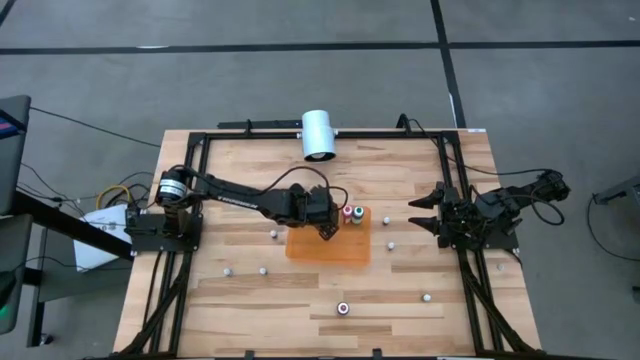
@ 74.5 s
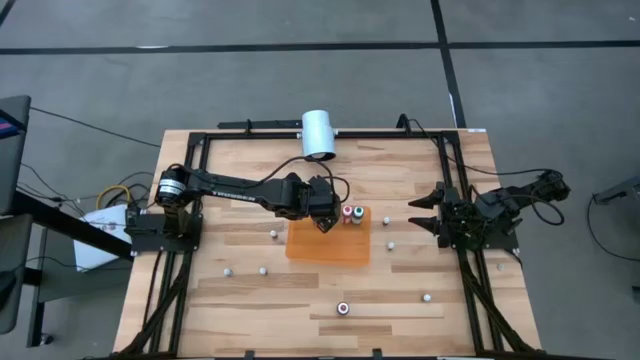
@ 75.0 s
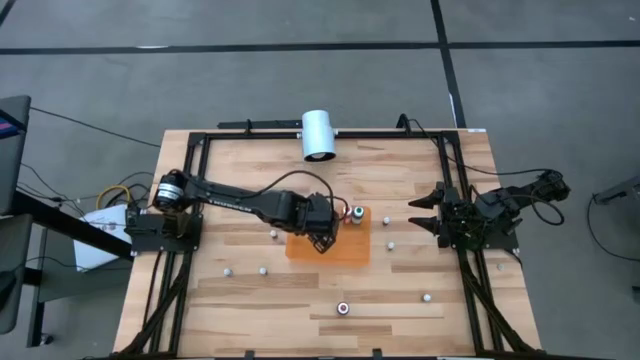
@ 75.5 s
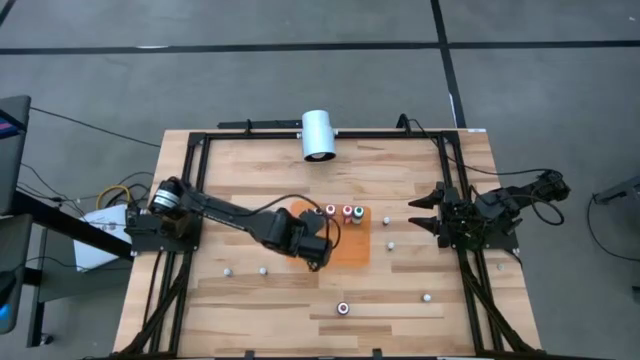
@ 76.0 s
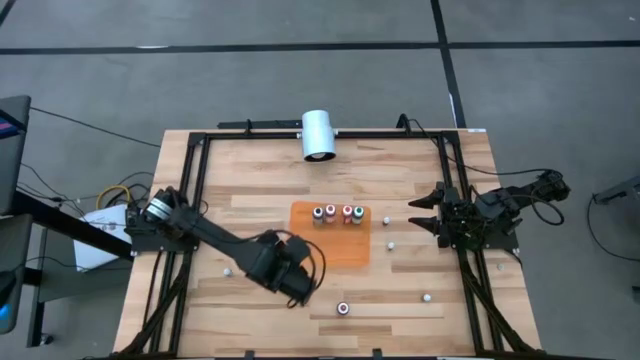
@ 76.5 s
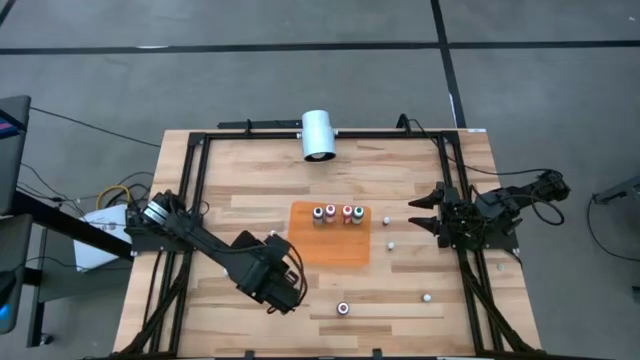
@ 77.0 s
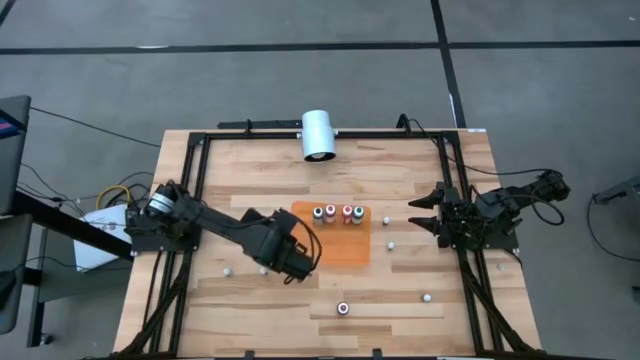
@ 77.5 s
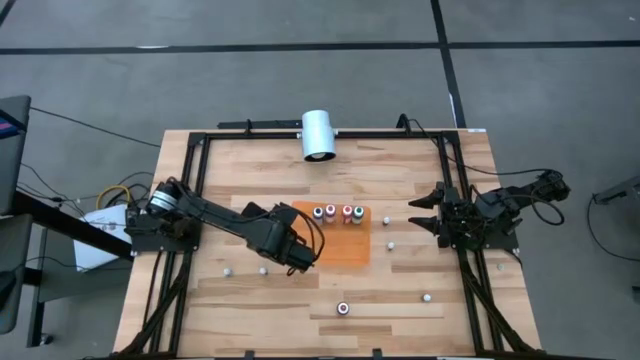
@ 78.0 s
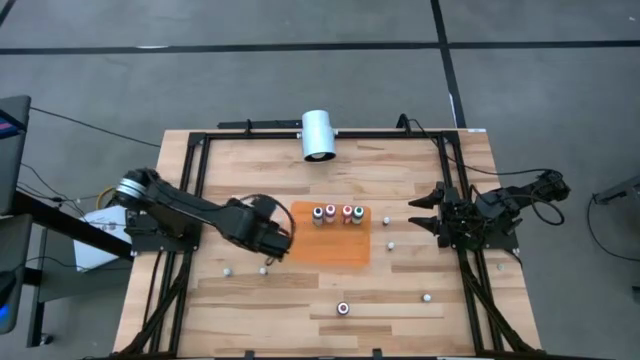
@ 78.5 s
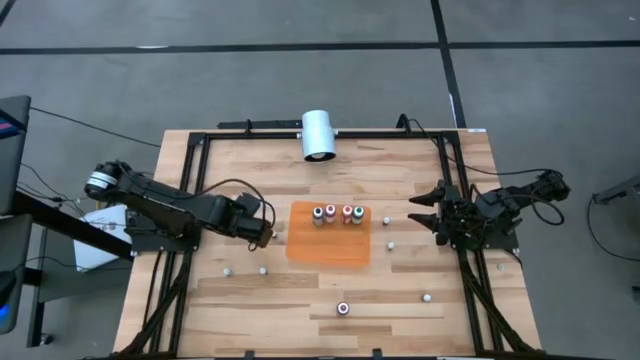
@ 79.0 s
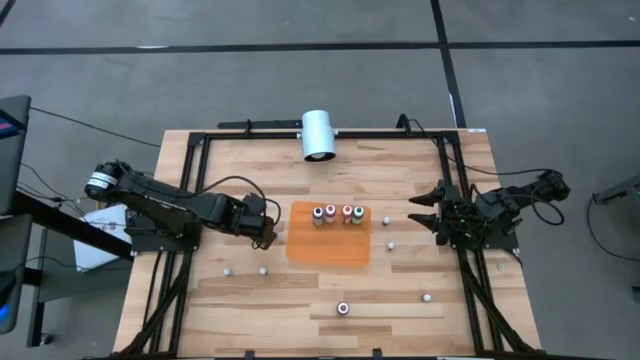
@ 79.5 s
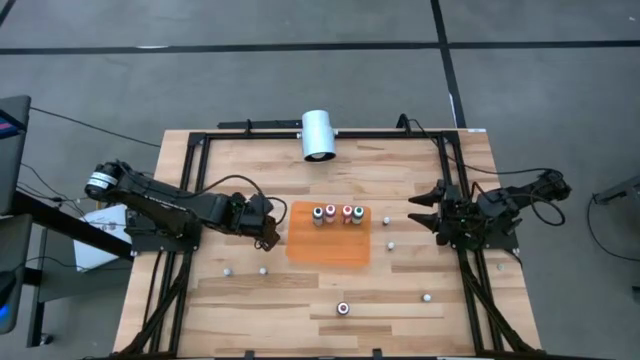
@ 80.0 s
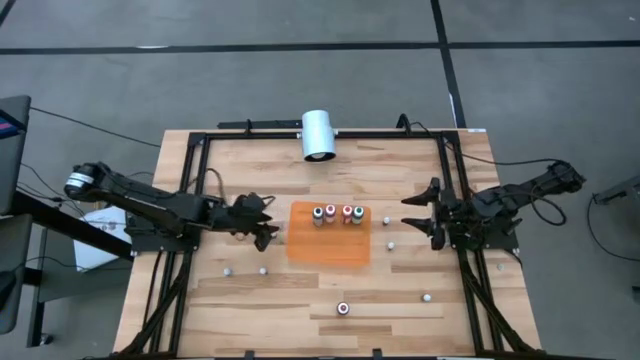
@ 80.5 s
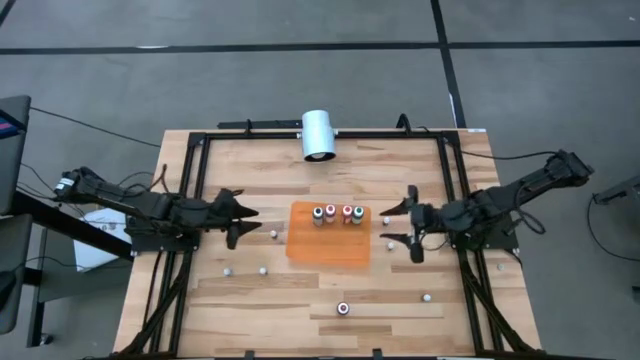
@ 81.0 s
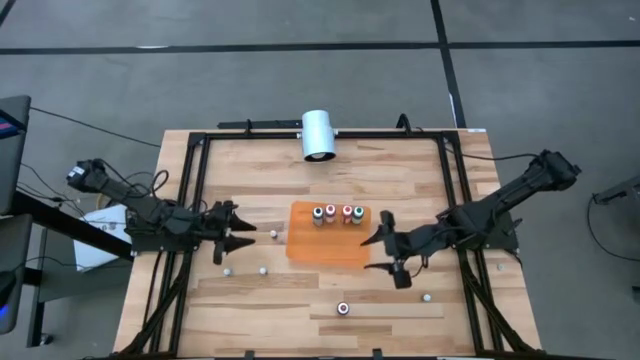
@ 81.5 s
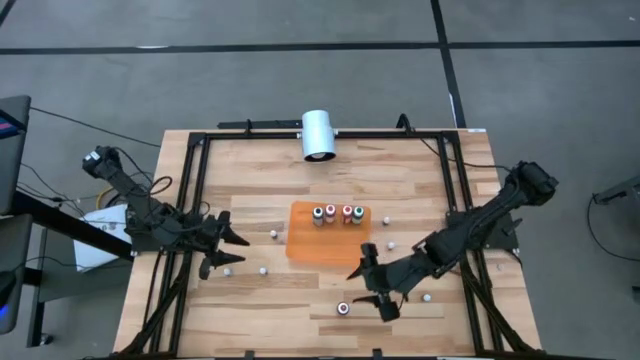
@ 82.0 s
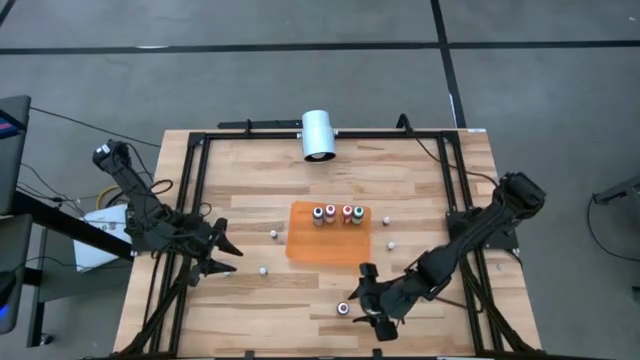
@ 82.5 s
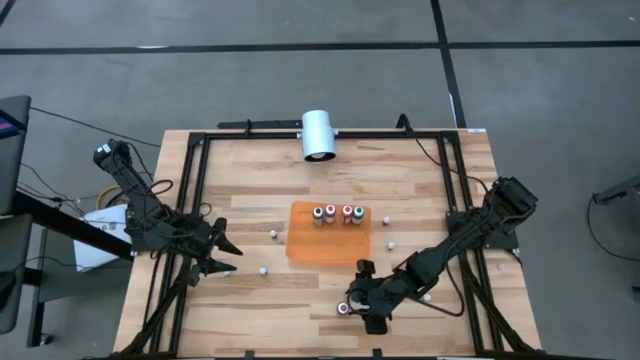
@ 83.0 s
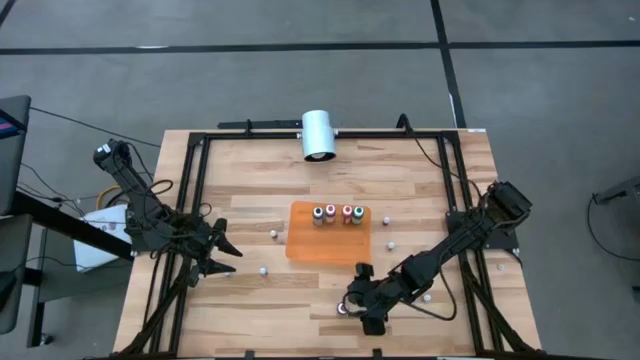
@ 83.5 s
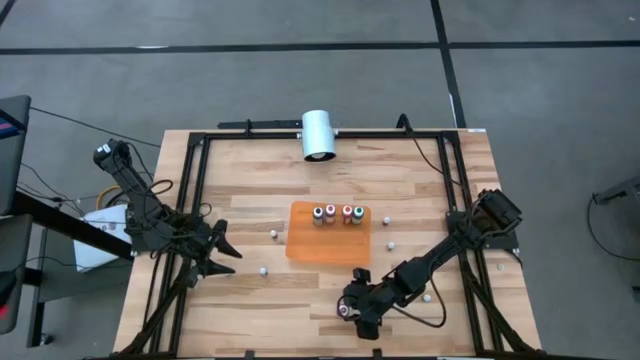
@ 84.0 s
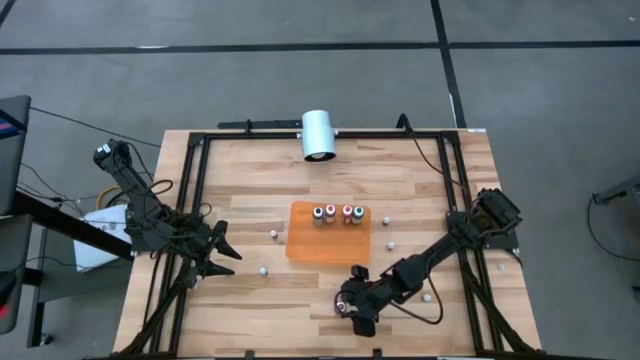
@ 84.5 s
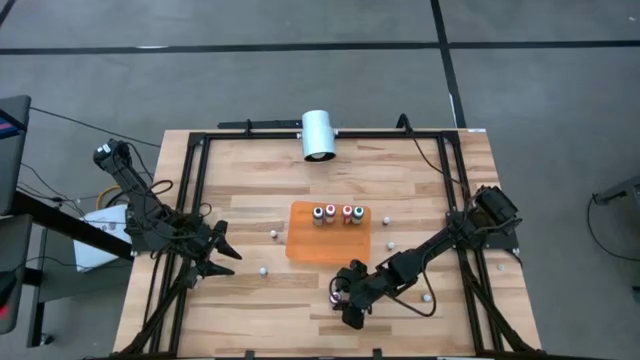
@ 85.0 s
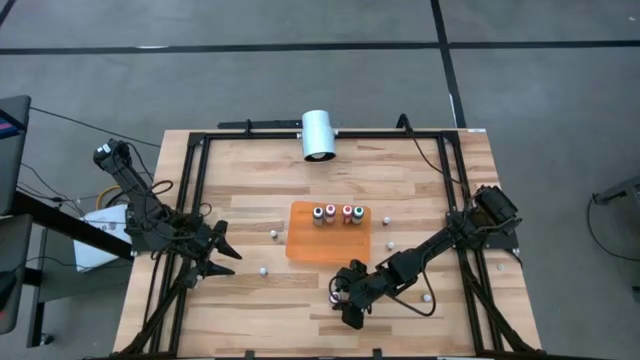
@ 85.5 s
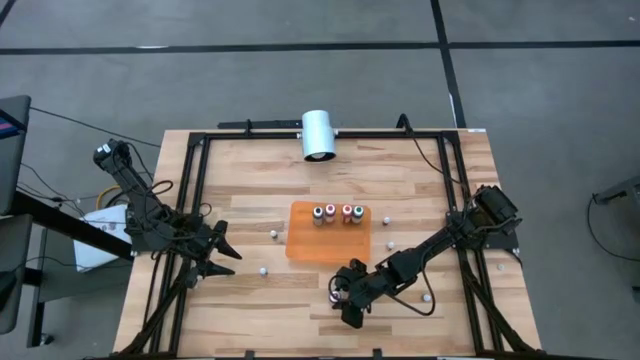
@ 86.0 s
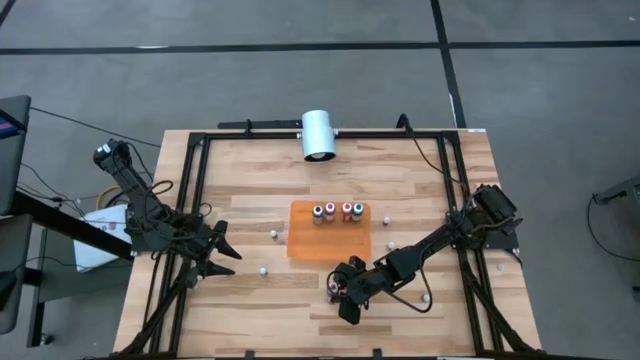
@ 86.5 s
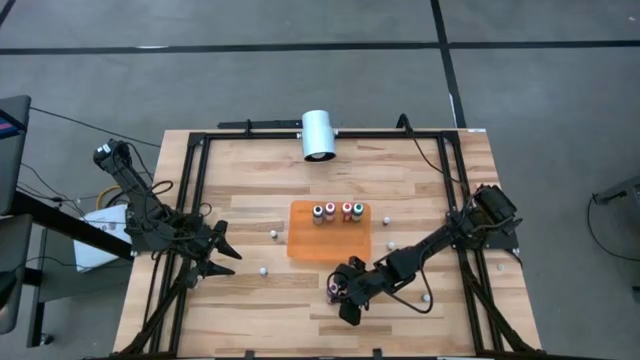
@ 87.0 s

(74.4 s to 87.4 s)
Task: Pick & Place food coloring
Put the large red food coloring into the orange bin

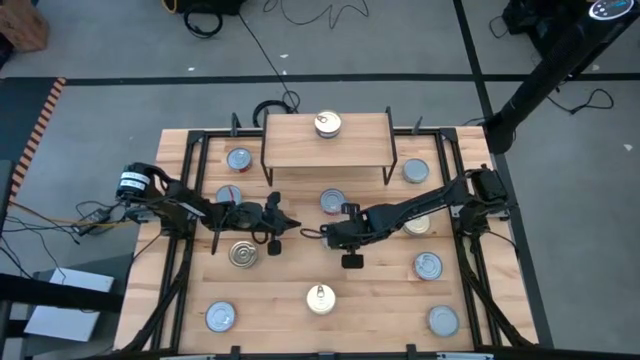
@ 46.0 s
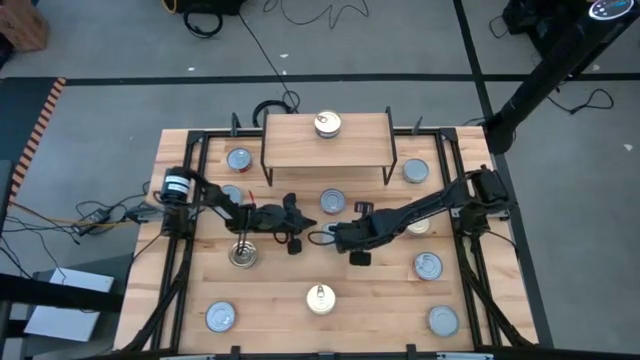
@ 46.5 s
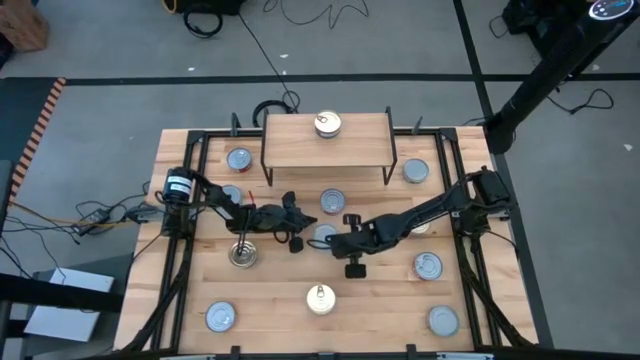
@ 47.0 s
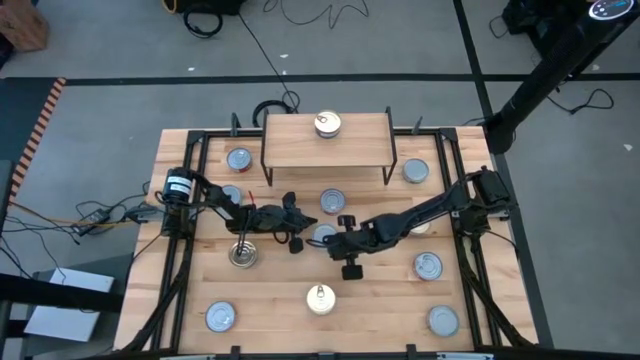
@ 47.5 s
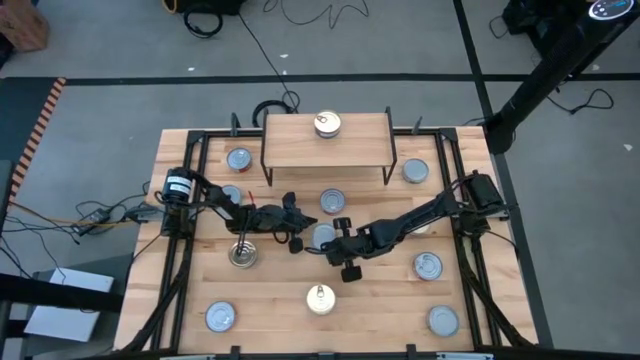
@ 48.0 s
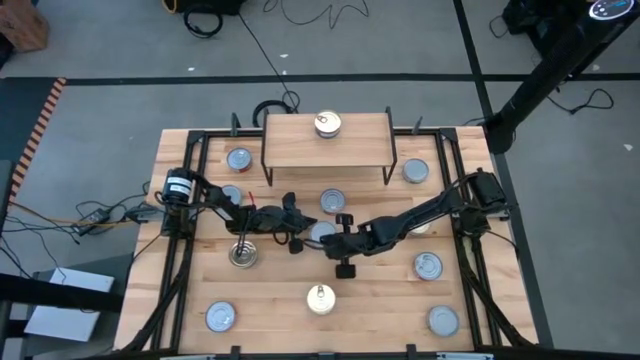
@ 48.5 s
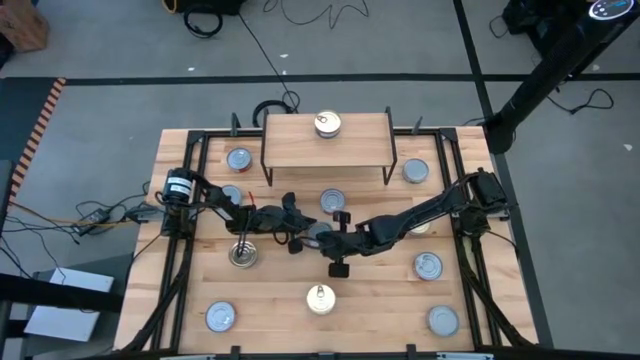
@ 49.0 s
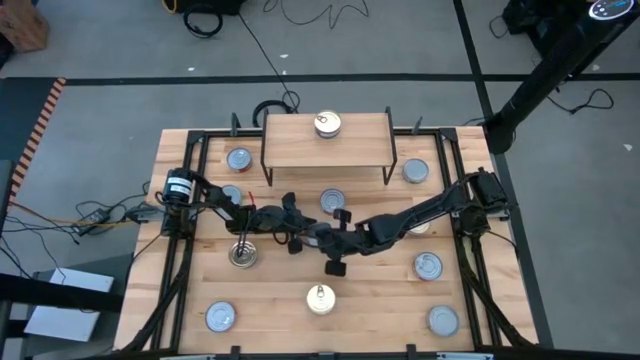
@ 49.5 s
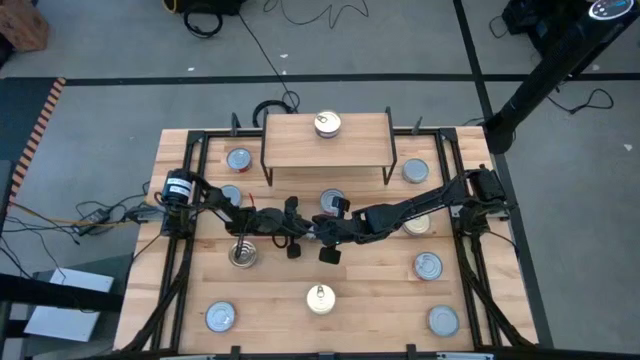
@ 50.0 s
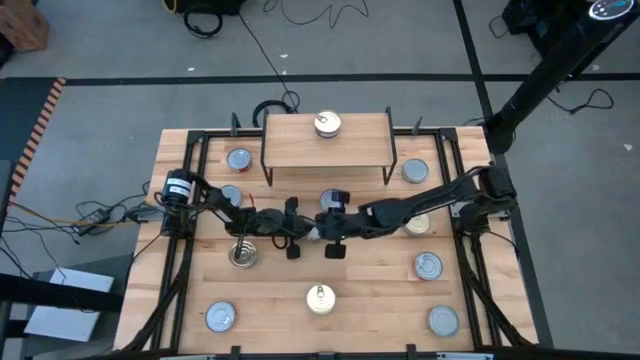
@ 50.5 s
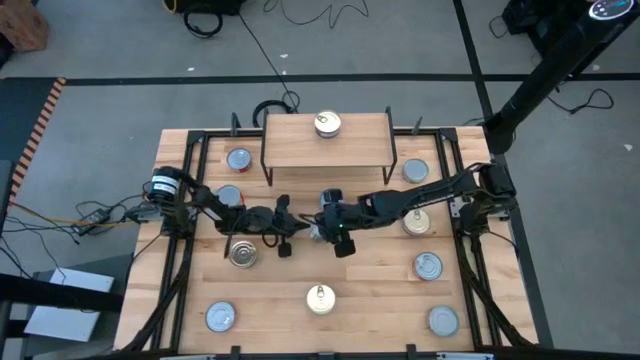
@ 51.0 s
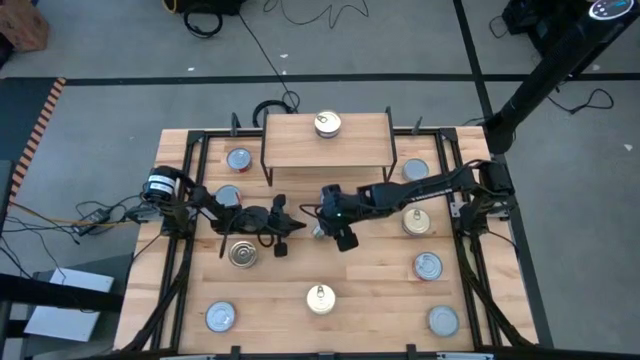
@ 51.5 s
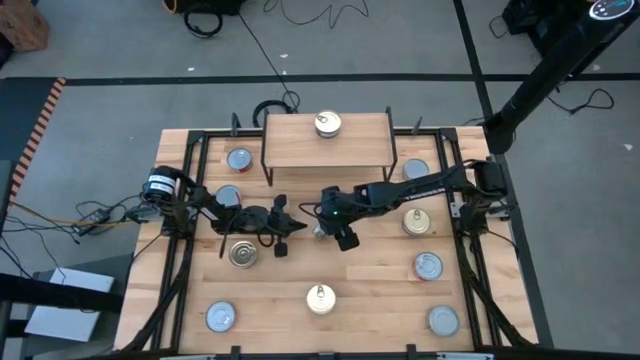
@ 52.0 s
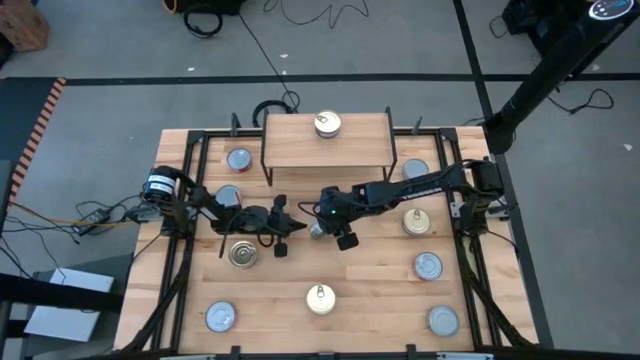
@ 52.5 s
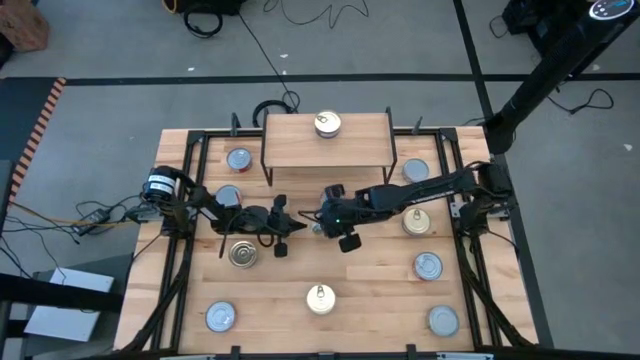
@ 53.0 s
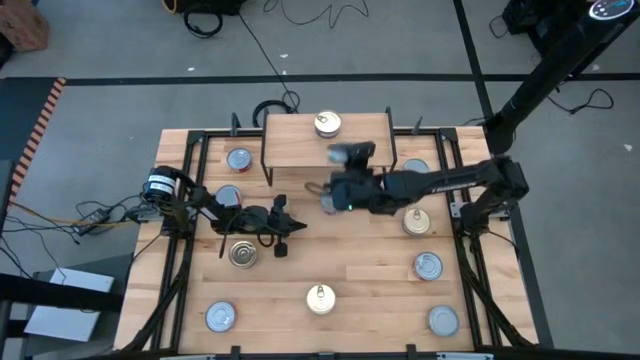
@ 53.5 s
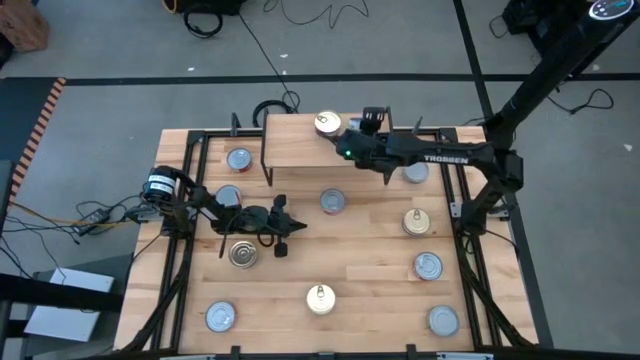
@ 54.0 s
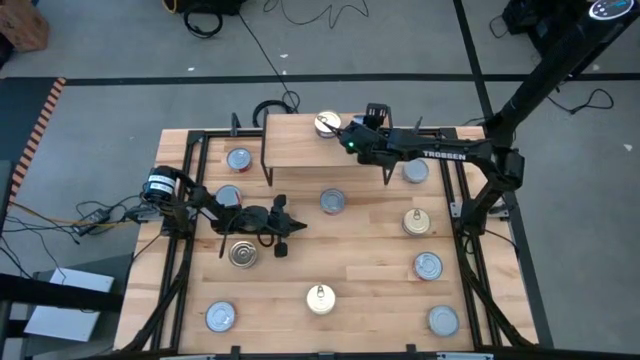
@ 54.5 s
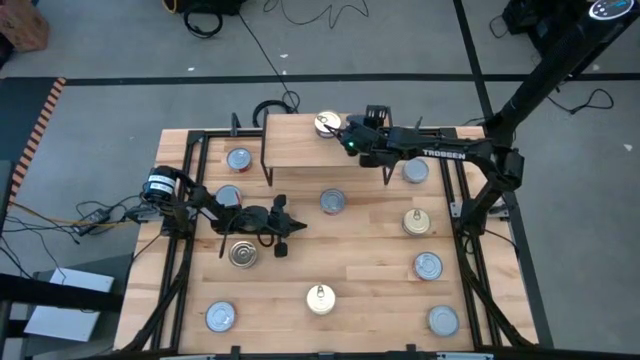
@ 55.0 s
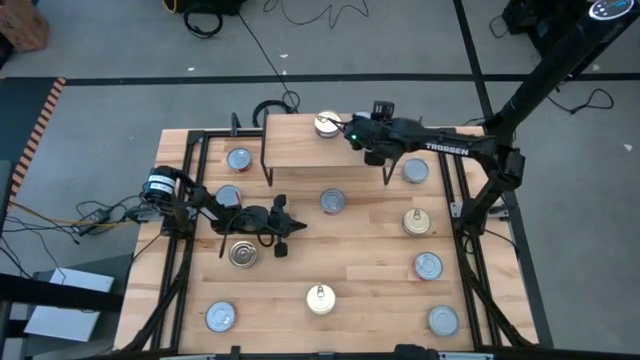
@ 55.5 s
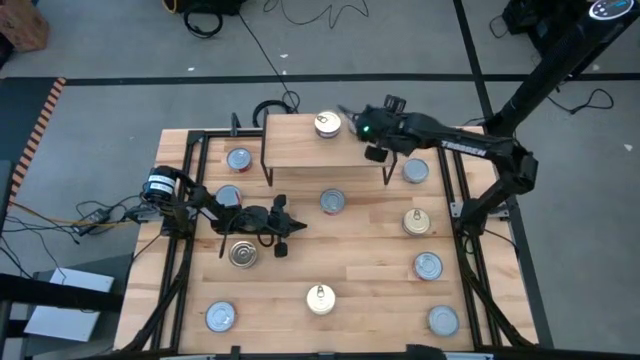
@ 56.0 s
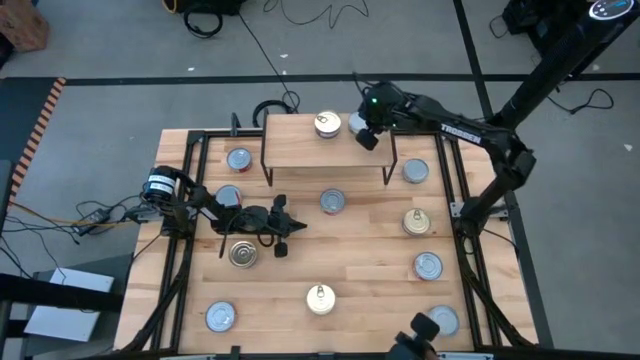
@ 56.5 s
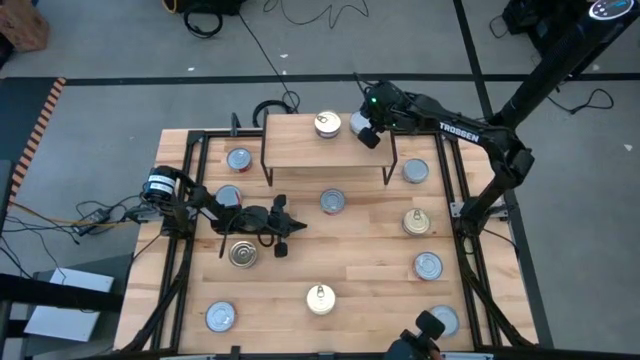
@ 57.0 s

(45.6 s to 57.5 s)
Task: Stack canned seafood by type on shelf
Put the green tuna can on the shelf
